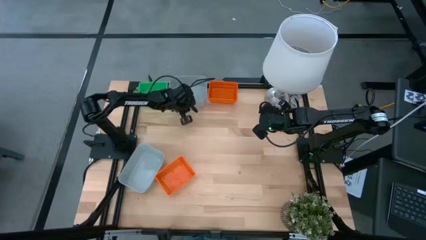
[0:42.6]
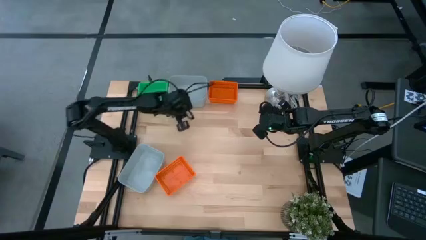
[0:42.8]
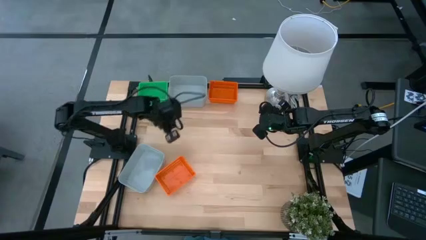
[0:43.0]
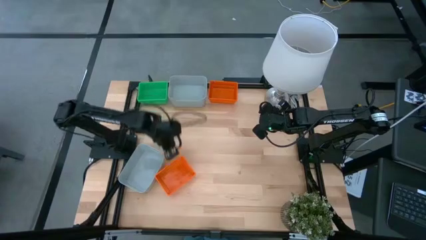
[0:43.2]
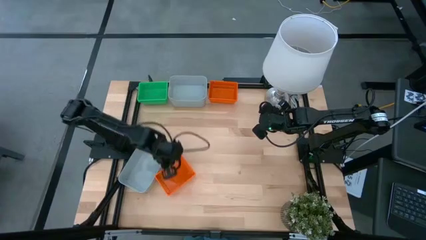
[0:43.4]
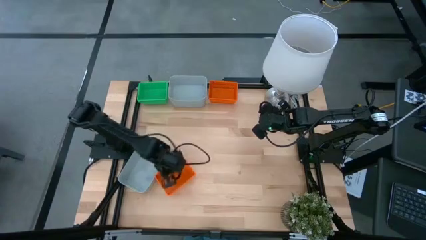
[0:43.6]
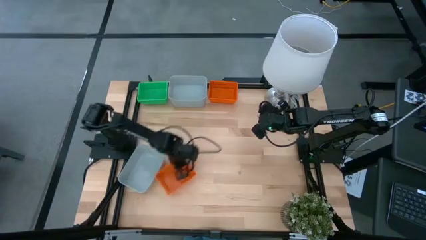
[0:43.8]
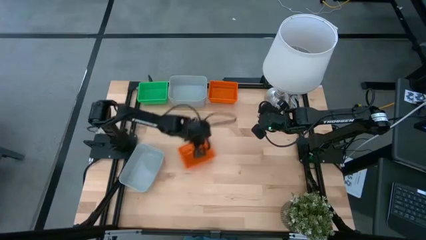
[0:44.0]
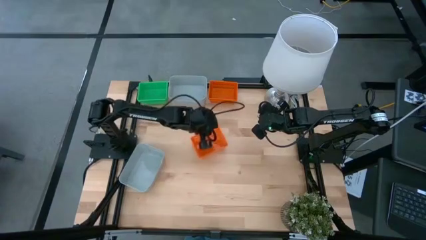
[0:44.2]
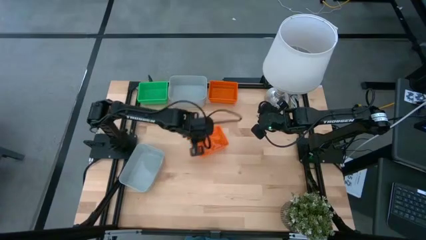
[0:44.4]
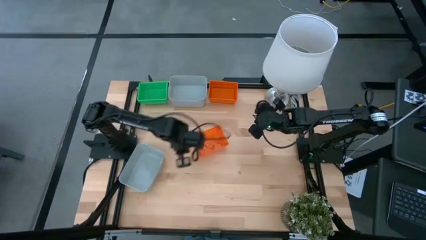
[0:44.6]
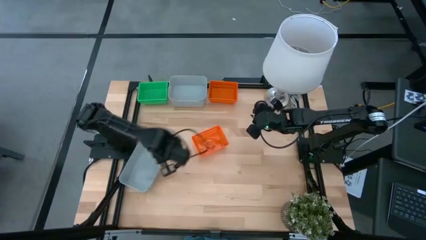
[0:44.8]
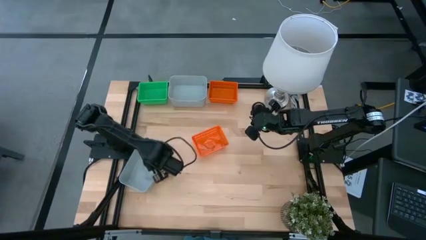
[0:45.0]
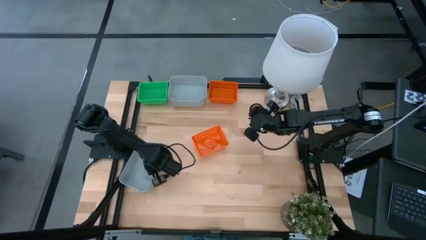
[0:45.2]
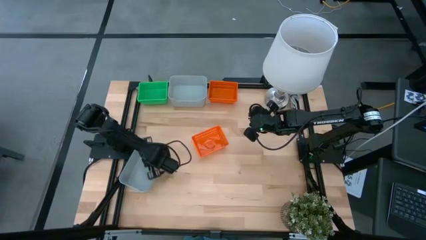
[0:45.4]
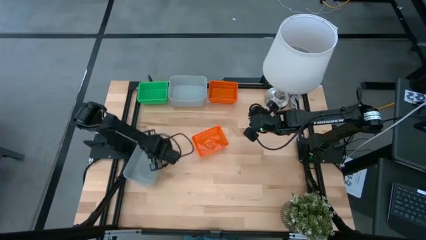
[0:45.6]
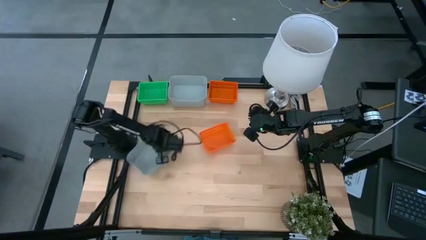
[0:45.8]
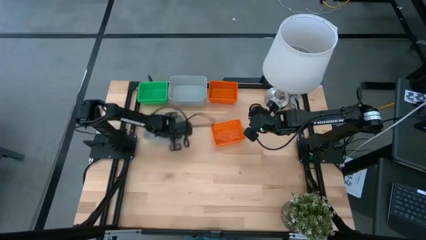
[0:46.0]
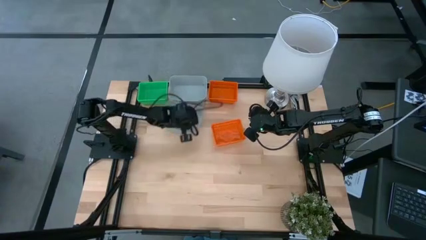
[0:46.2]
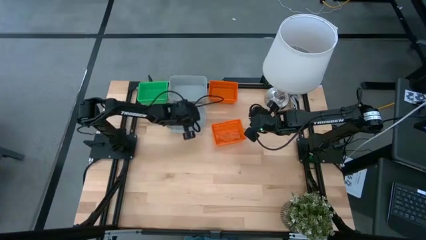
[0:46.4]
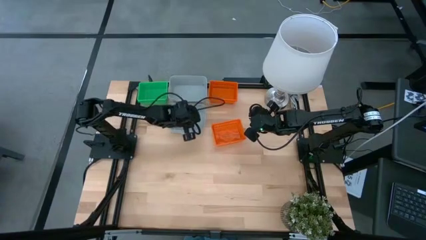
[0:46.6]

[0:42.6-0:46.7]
Move the bottom bins to the top of the table

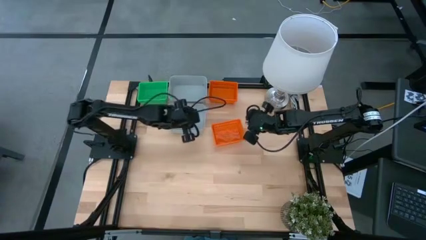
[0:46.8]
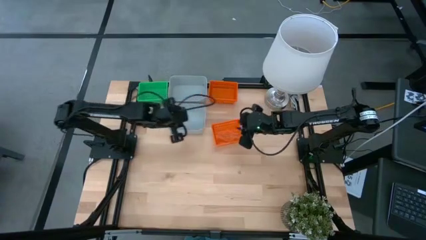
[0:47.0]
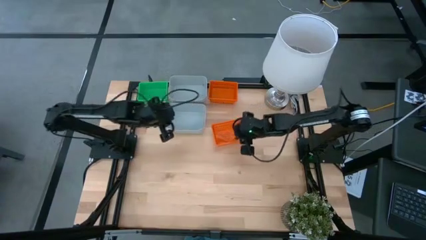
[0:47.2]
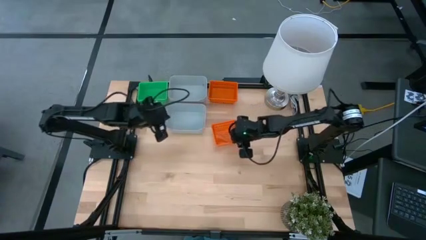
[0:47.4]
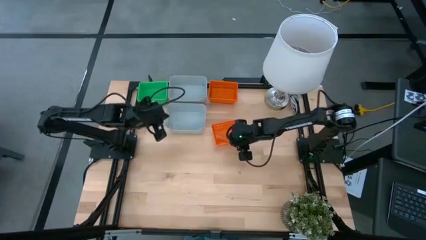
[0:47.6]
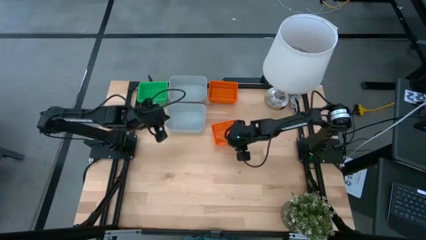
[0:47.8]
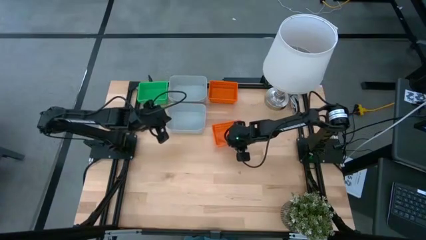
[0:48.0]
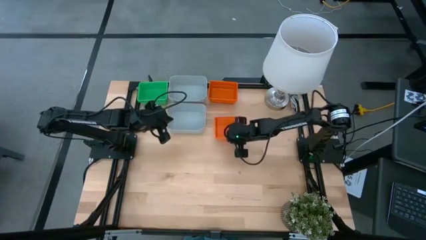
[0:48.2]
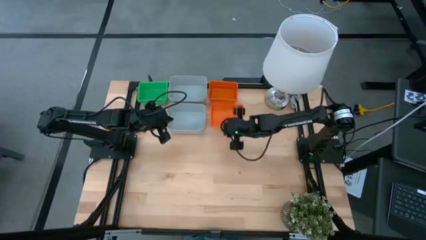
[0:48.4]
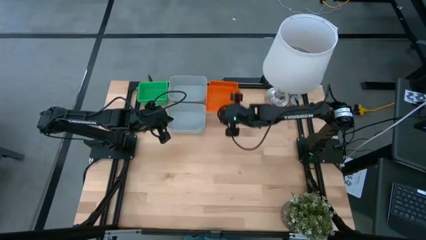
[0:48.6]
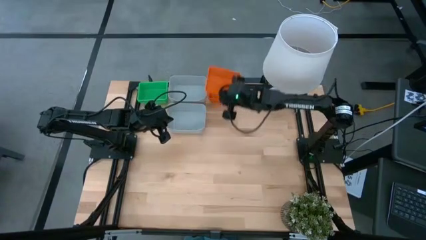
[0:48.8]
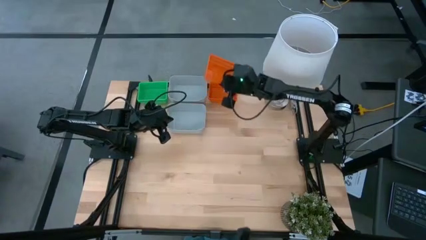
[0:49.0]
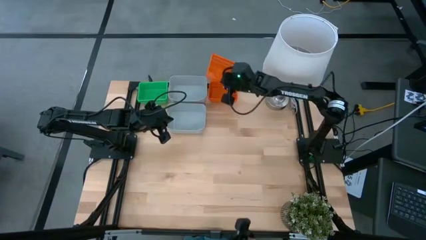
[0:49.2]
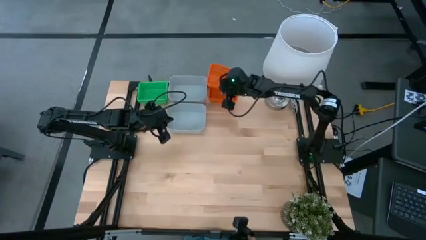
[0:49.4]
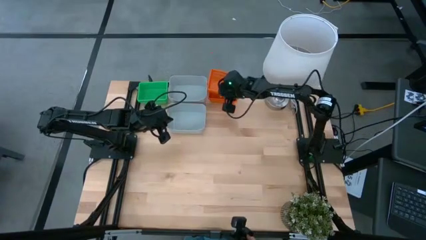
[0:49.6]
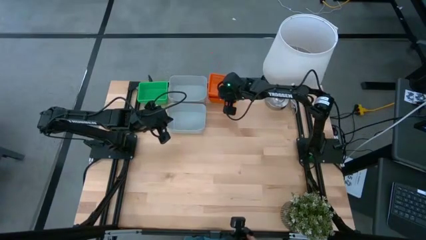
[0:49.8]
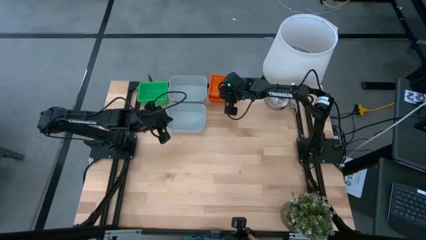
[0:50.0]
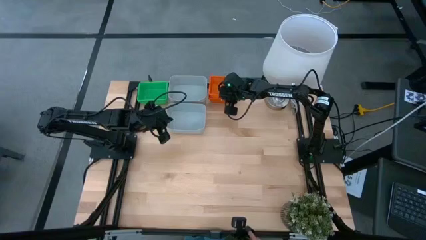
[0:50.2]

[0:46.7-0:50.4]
Stack the bottom orange bin on top of the top orange bin

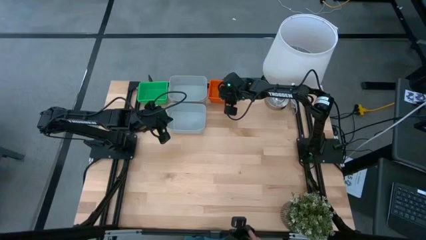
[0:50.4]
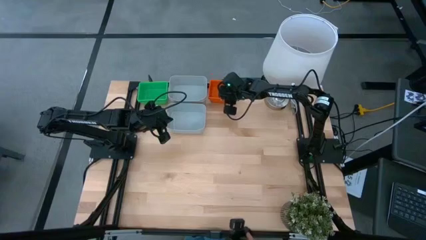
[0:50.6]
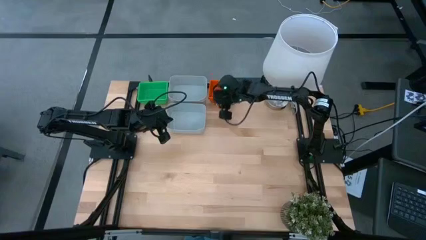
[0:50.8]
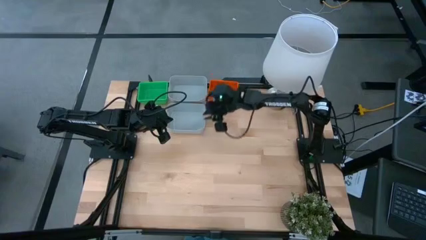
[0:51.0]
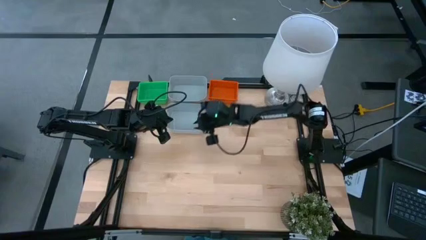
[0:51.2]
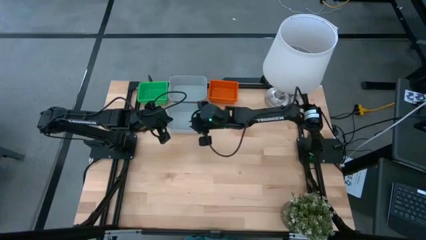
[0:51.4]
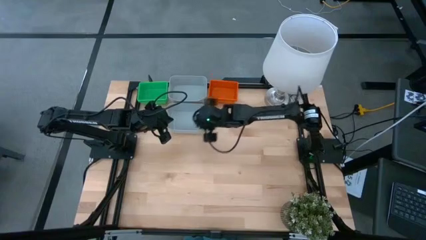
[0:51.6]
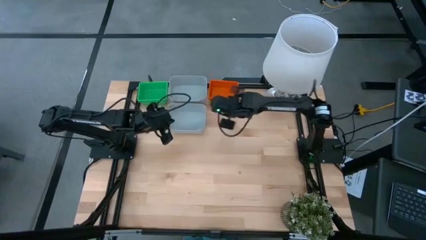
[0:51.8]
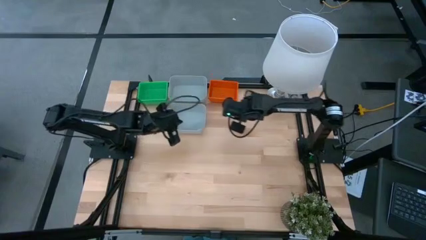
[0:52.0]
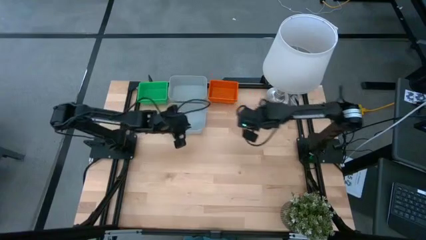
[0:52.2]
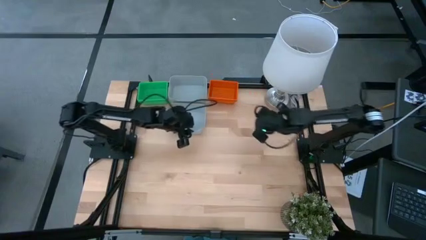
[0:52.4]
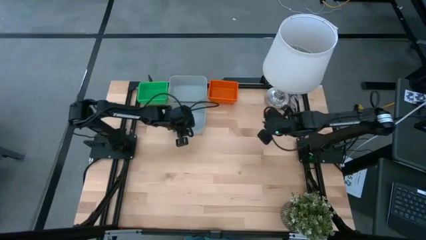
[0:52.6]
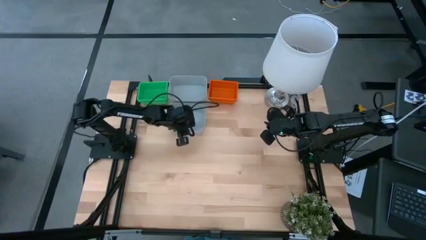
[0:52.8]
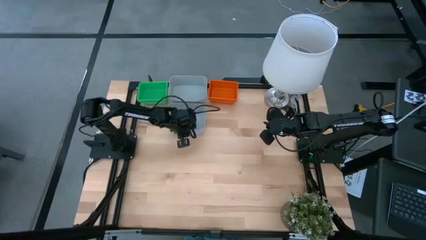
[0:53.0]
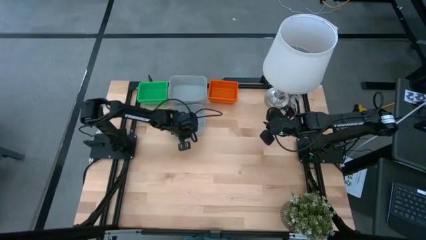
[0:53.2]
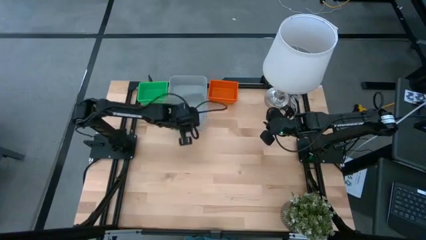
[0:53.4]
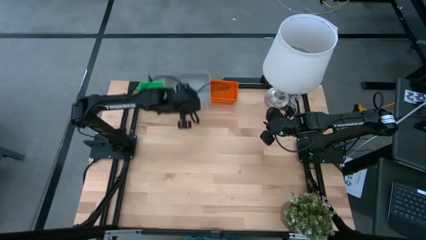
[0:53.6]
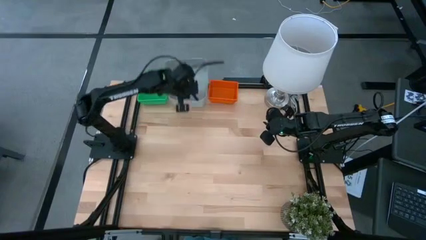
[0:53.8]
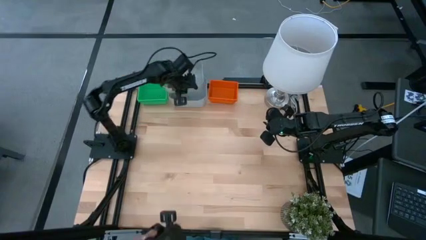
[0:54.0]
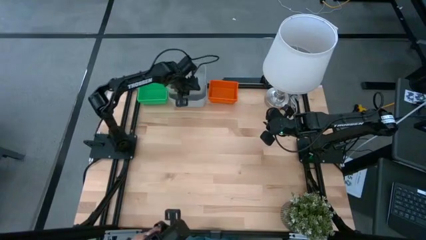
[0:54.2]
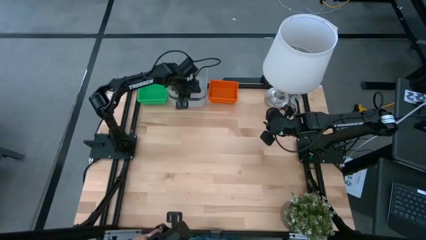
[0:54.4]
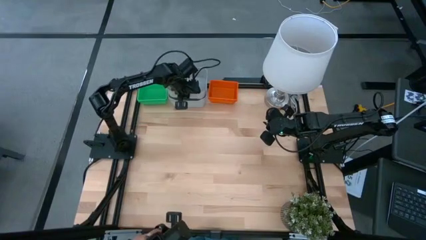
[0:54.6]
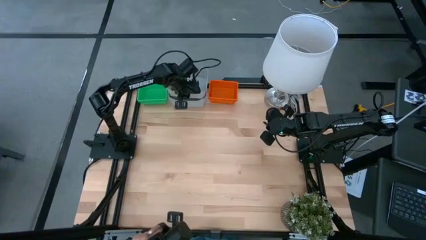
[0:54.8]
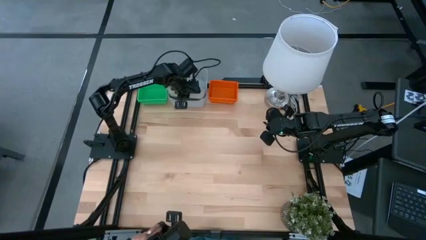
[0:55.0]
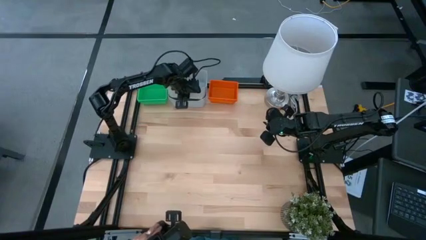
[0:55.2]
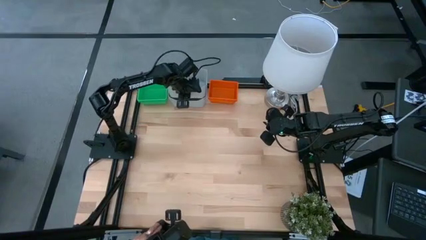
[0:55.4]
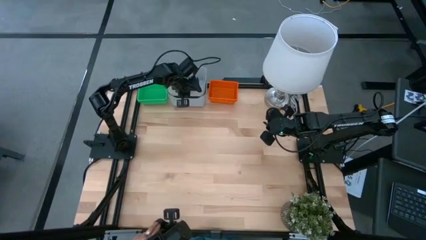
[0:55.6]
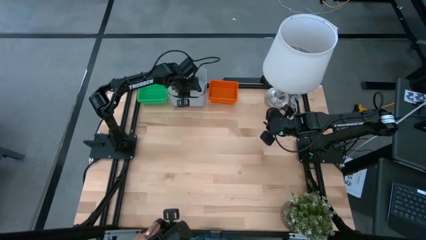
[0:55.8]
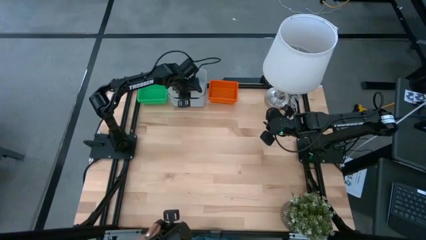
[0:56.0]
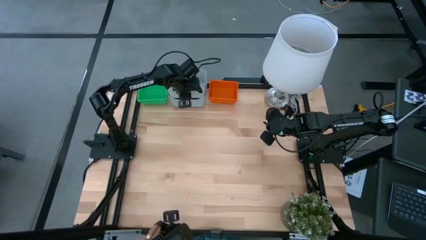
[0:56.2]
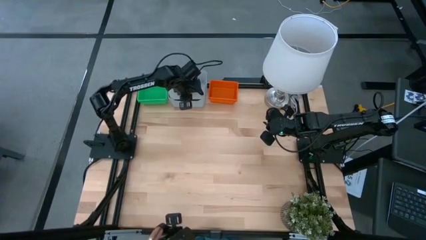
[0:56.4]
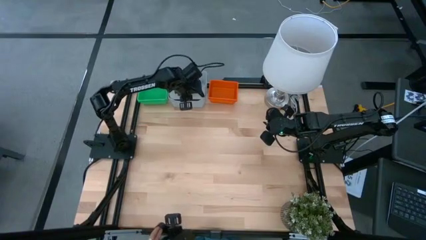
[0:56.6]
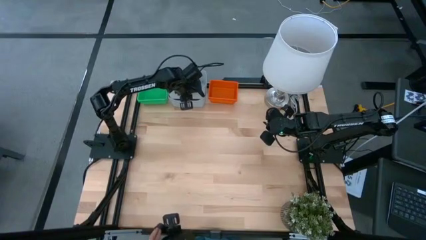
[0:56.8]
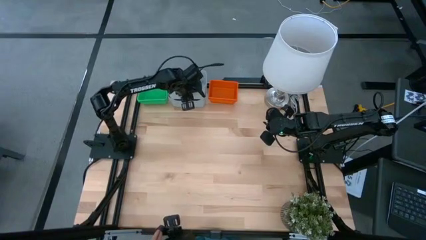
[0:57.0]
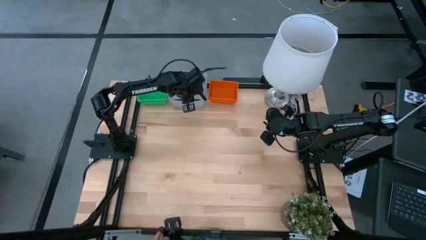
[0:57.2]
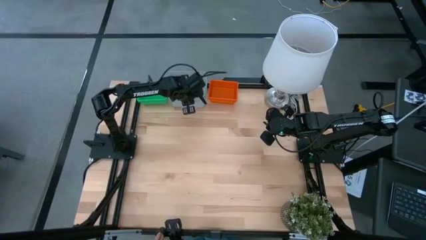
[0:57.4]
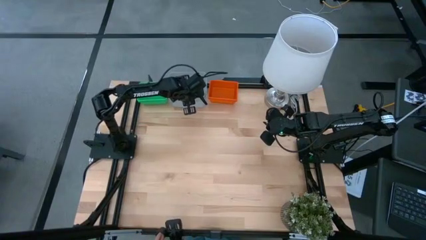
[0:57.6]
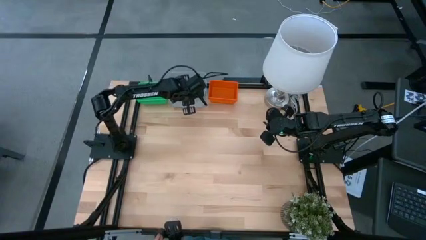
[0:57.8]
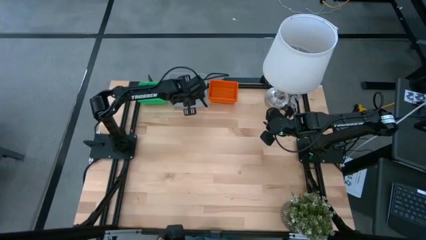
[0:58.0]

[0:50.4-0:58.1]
Stack the bottom gray bin on top of the top gray bin

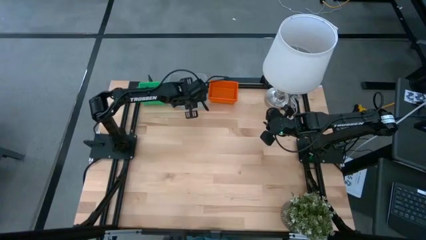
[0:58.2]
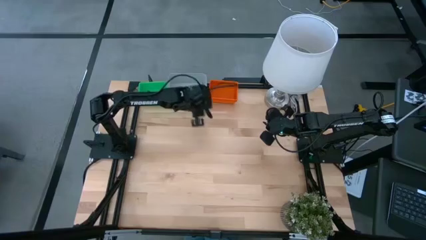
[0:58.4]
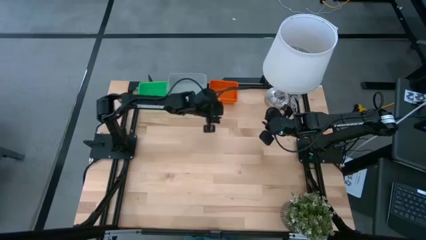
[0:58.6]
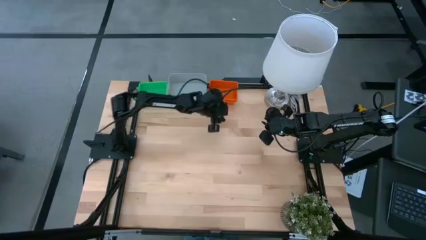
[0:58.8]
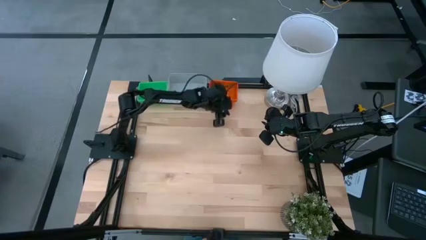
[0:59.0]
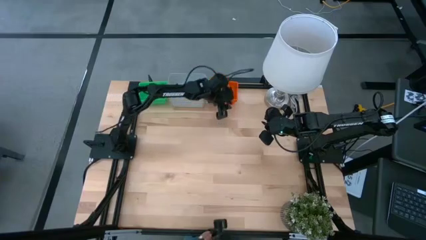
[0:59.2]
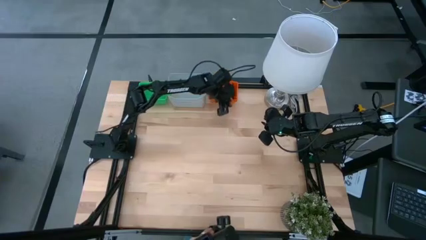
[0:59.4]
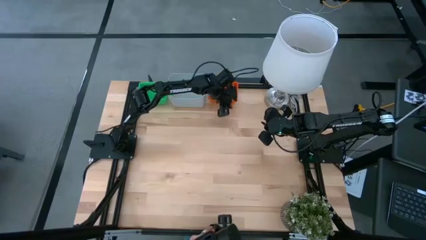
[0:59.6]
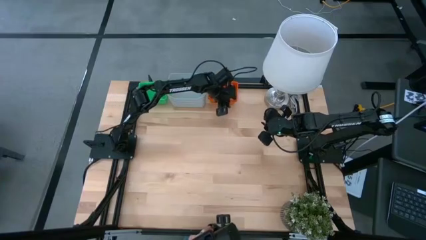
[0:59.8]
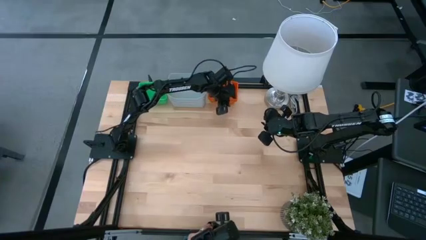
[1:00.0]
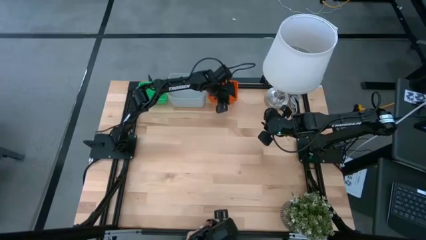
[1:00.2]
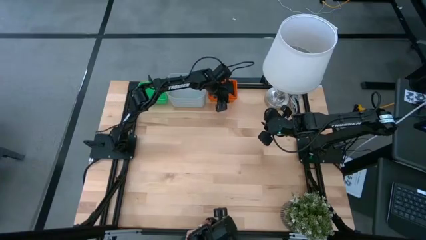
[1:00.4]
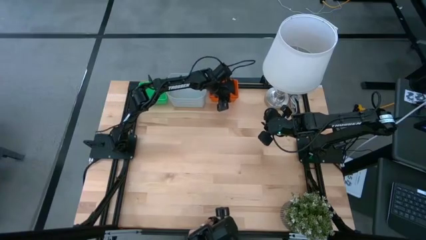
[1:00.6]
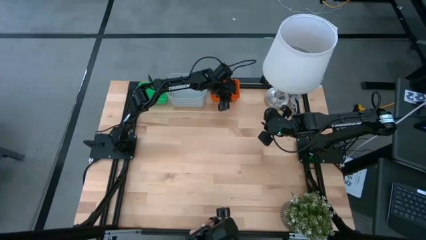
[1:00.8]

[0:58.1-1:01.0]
Adjust the stacked orange bins
